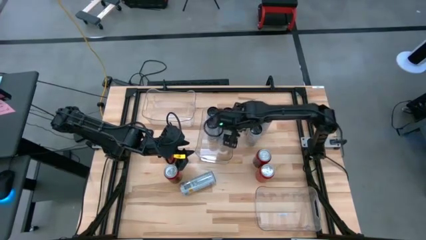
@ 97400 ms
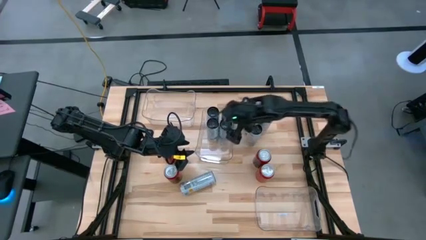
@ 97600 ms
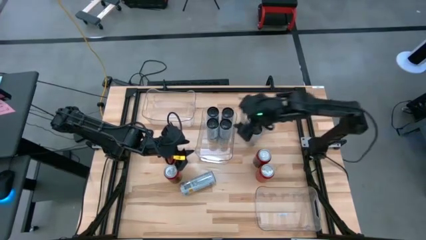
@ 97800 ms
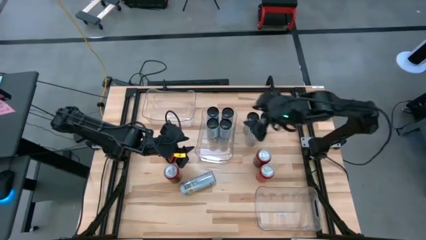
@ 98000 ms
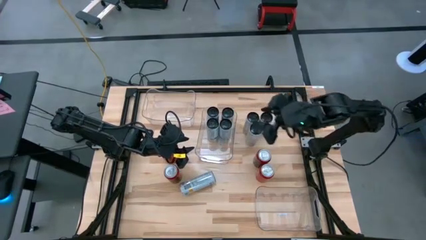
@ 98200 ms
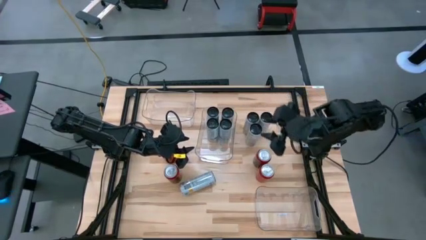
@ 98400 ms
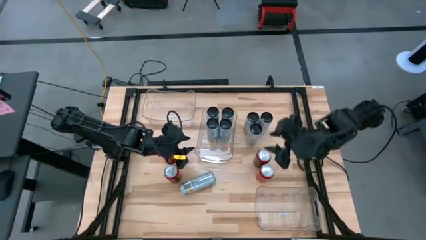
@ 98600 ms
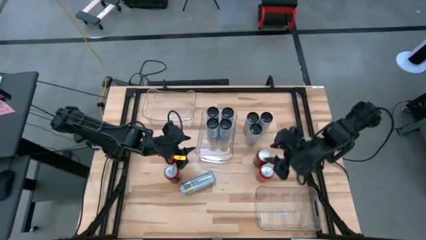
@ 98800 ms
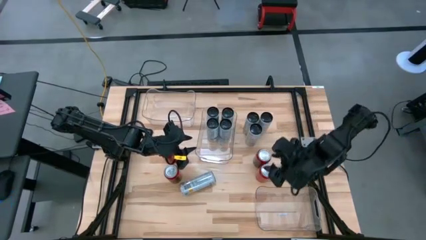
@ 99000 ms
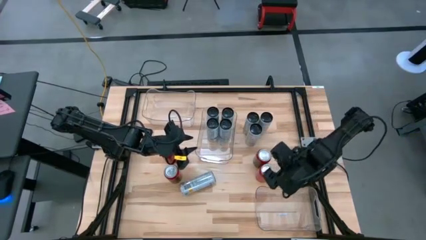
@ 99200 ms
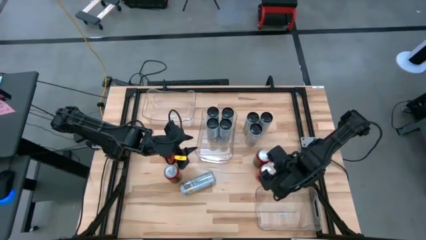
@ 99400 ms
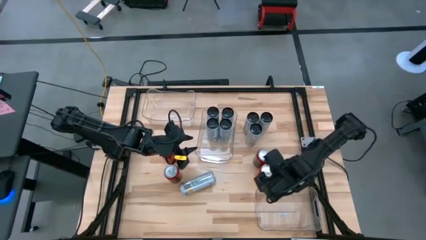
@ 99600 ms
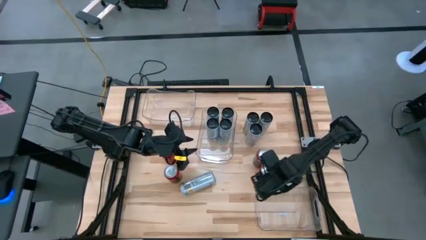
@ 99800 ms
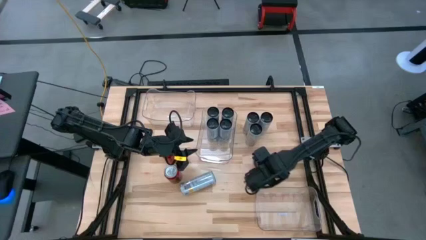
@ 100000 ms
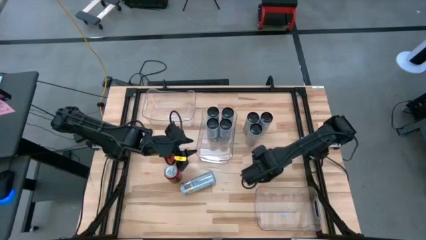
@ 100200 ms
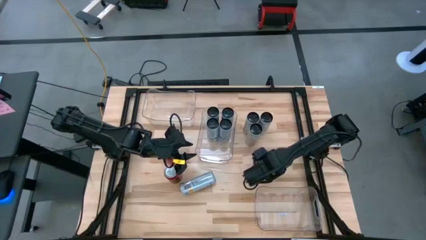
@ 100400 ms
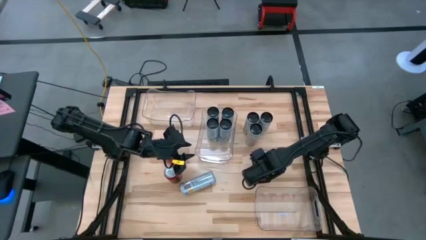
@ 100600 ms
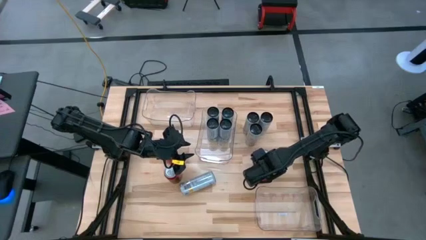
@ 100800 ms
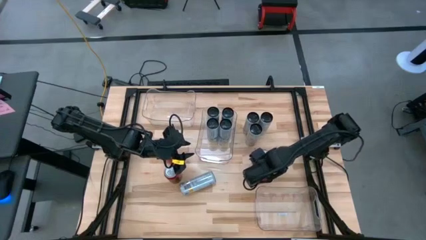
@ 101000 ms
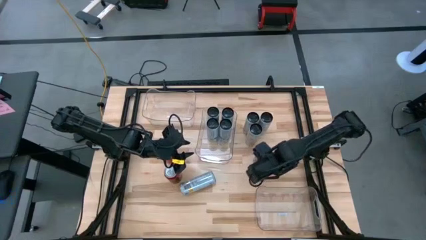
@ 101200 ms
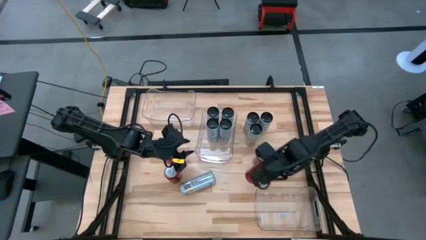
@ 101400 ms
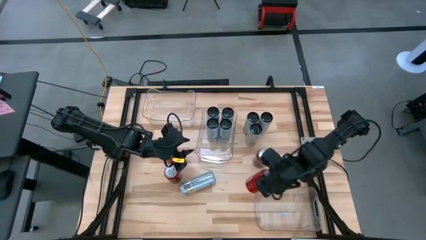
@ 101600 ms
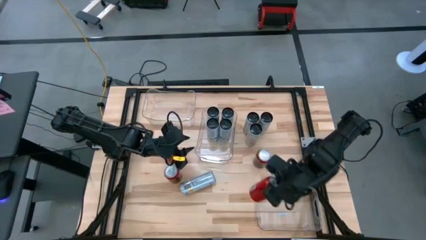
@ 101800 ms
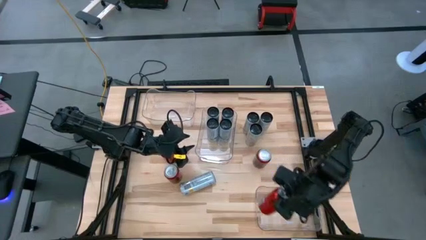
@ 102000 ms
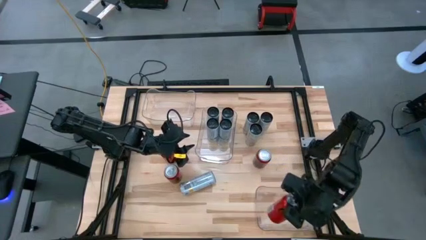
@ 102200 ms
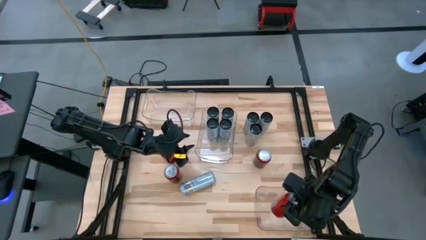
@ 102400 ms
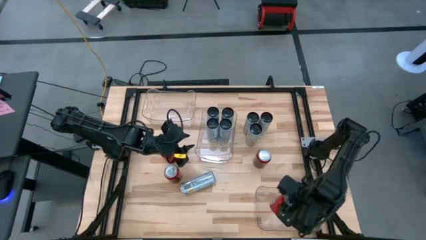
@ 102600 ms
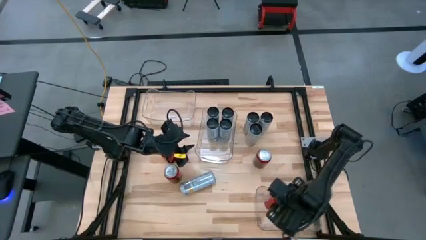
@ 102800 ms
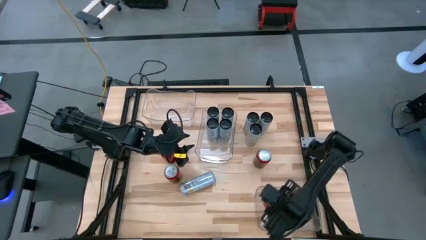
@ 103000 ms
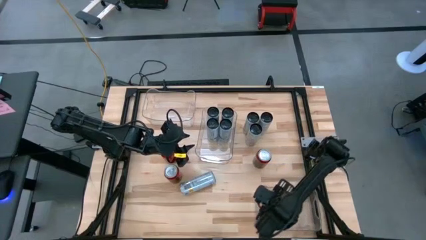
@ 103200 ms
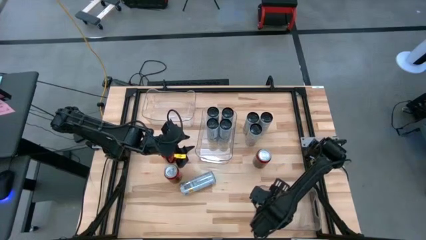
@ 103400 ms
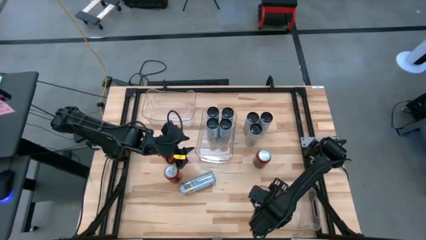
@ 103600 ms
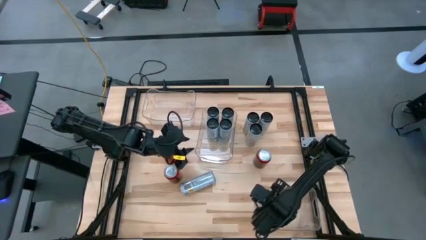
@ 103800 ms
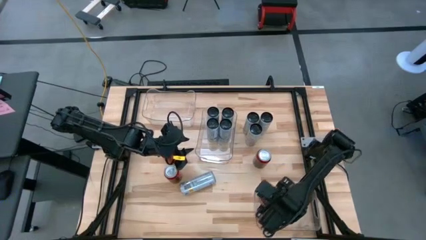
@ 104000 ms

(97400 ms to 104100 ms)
Task: Sort soda cans
Put the red soda can into the bottom transparent bin

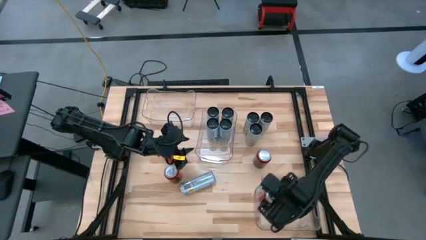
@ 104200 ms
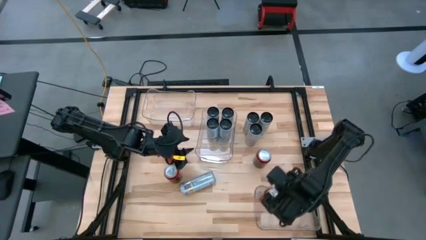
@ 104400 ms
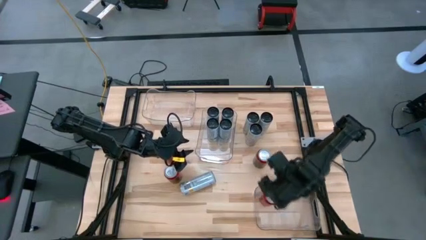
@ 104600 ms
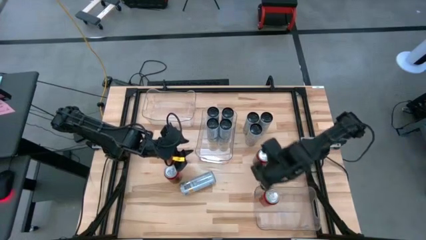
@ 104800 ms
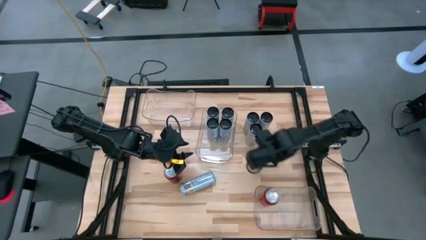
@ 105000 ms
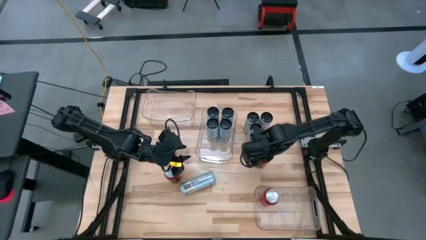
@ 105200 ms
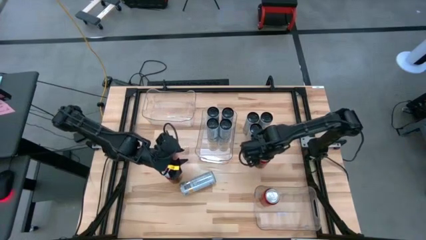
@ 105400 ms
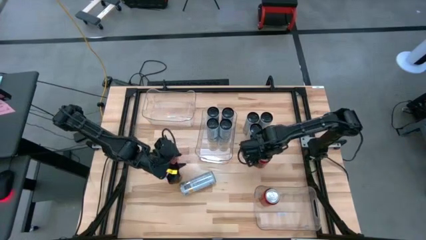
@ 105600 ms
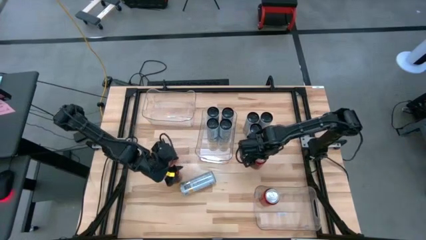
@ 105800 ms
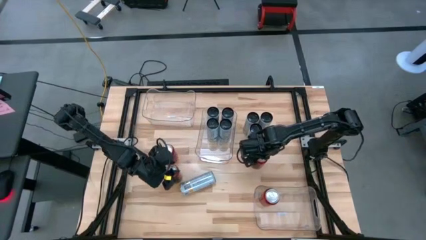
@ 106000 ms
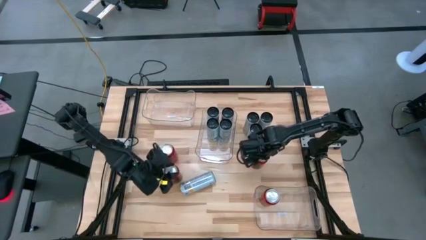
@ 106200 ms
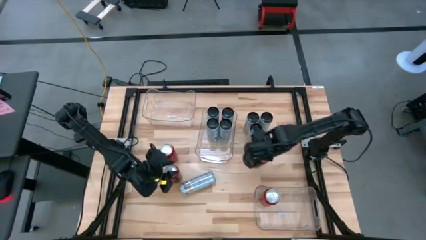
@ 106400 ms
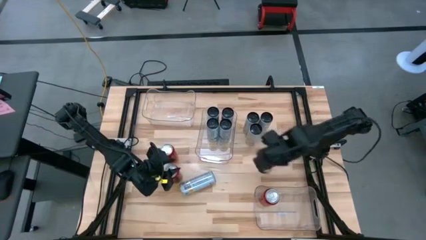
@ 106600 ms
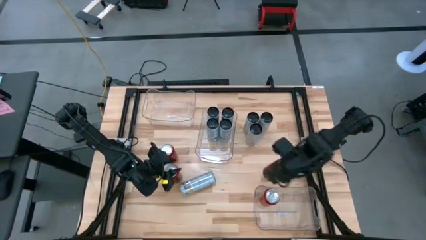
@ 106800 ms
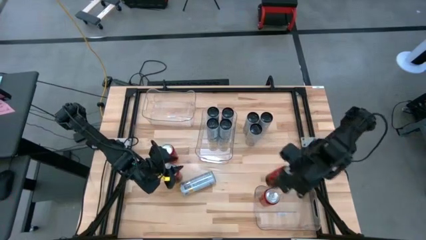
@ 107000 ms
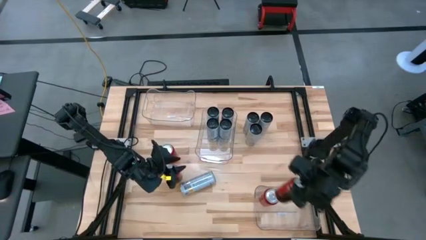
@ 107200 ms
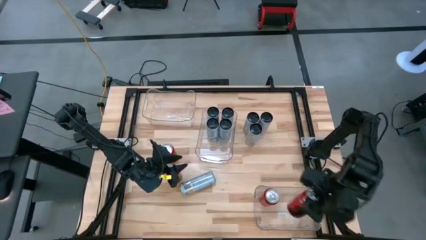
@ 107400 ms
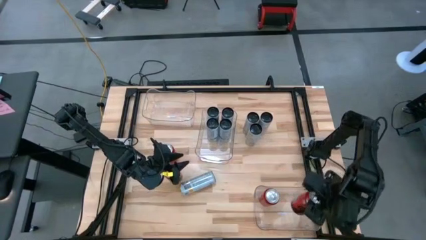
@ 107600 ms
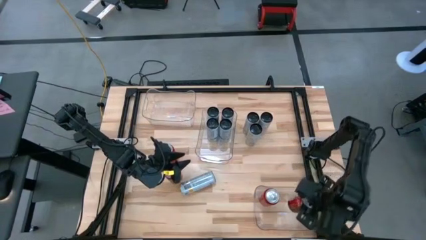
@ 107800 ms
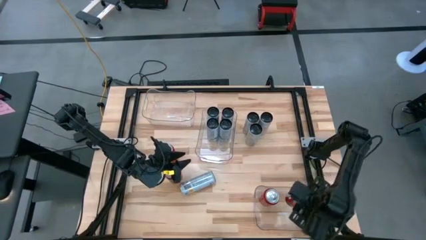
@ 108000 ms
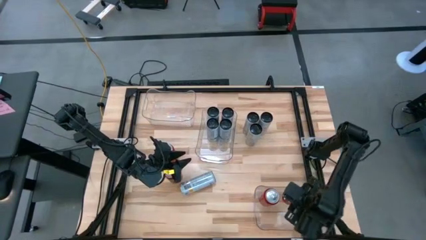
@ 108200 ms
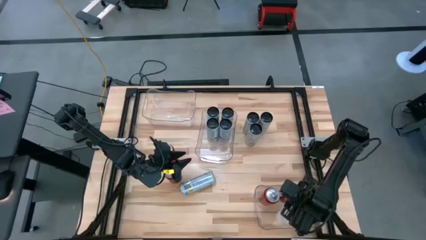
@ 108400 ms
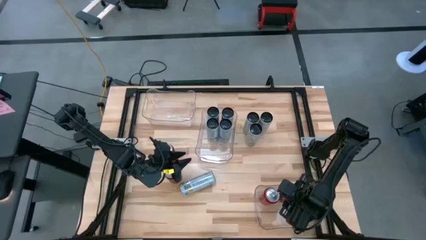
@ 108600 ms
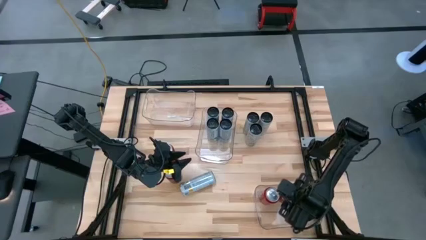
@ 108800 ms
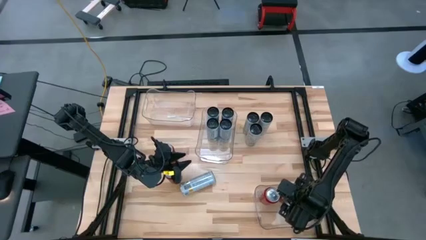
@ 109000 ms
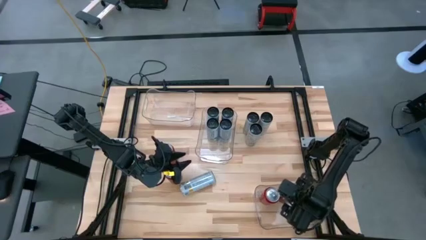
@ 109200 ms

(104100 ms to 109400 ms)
Put the red soda can into the bottom transparent bin
